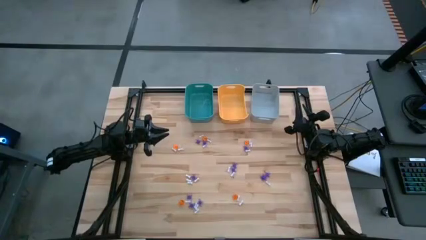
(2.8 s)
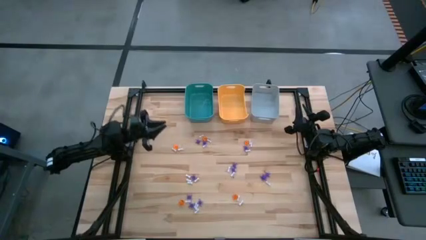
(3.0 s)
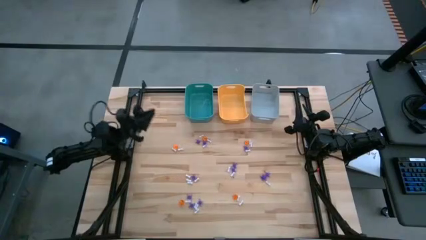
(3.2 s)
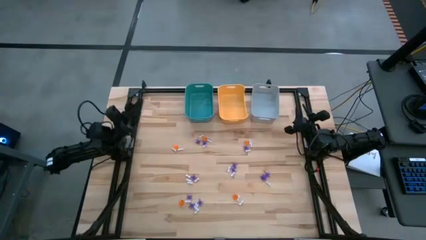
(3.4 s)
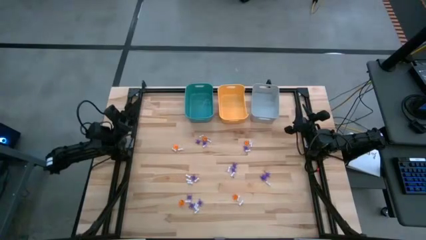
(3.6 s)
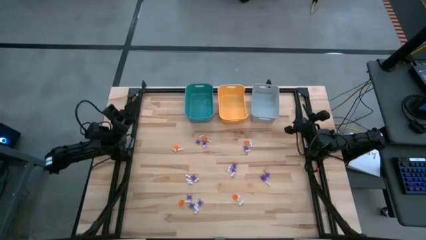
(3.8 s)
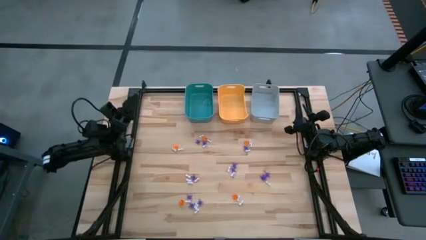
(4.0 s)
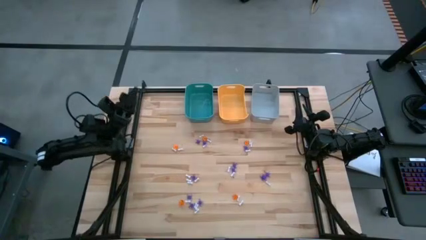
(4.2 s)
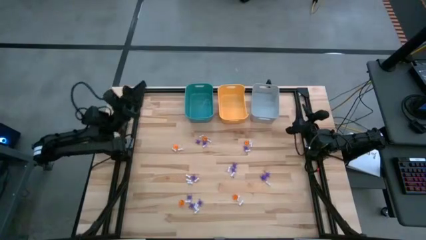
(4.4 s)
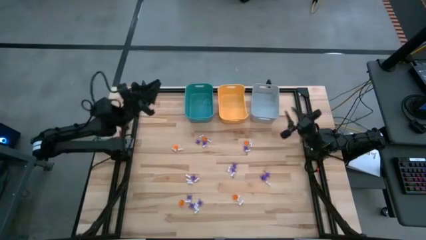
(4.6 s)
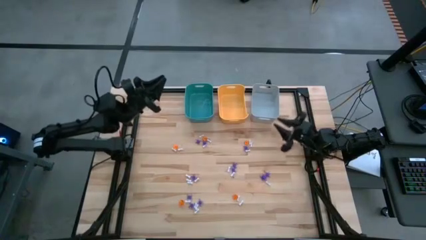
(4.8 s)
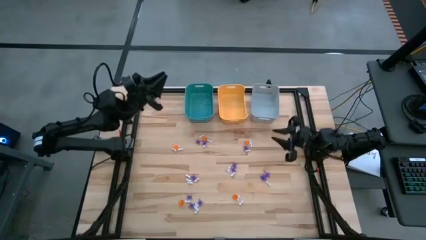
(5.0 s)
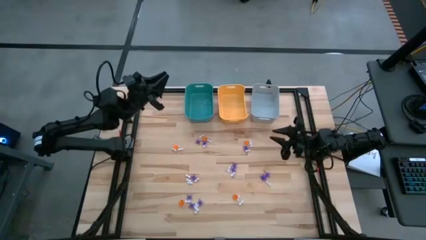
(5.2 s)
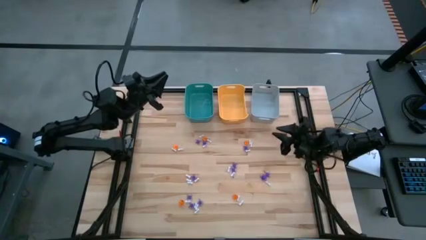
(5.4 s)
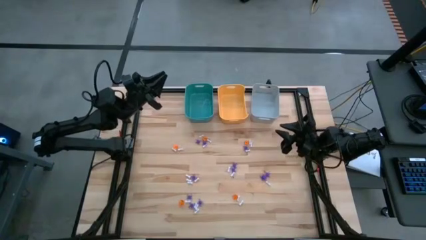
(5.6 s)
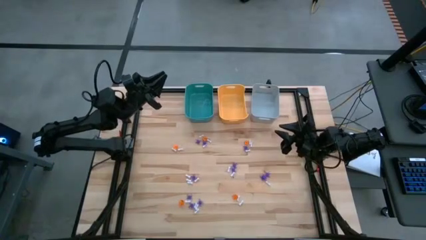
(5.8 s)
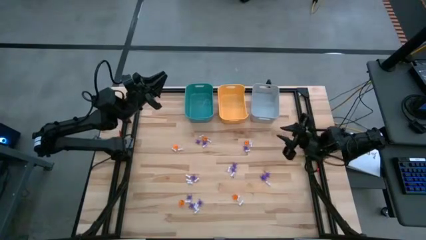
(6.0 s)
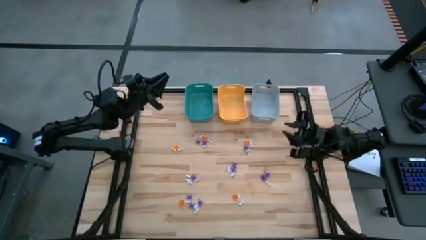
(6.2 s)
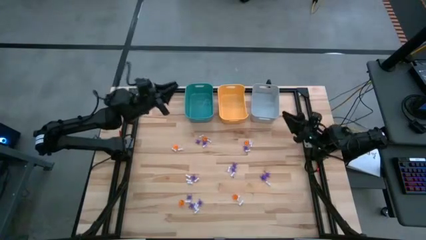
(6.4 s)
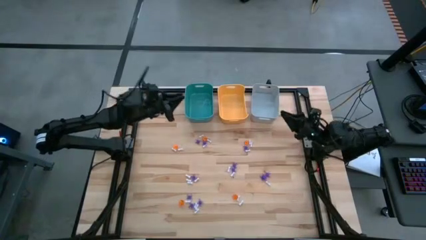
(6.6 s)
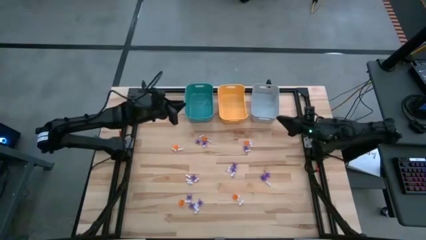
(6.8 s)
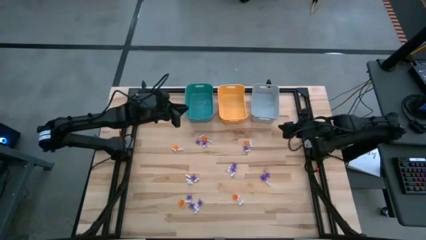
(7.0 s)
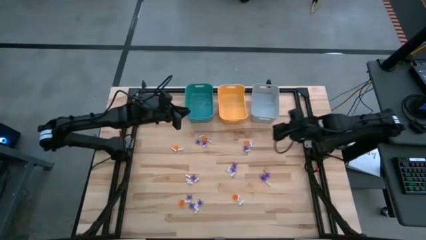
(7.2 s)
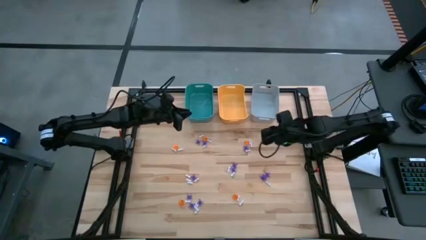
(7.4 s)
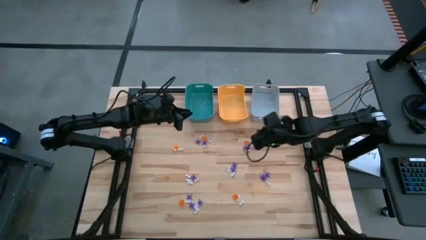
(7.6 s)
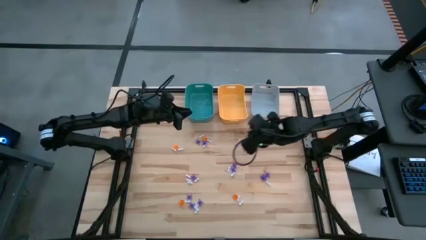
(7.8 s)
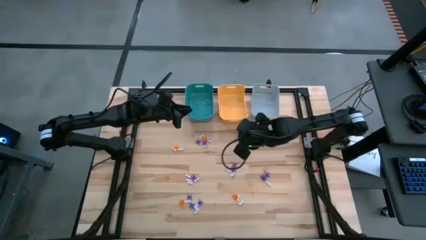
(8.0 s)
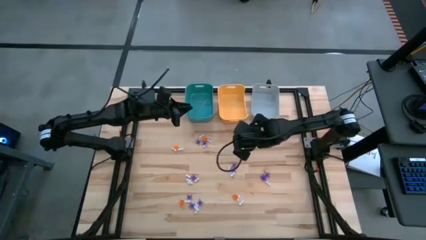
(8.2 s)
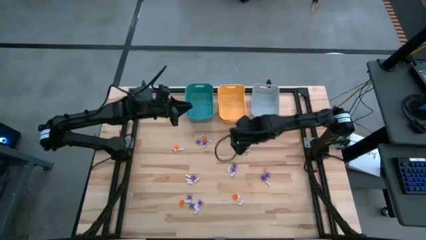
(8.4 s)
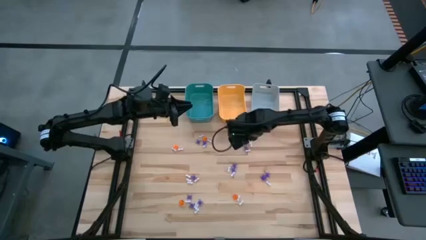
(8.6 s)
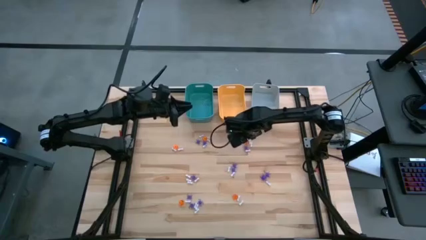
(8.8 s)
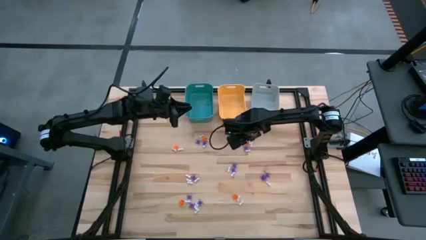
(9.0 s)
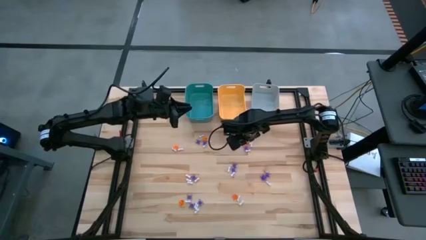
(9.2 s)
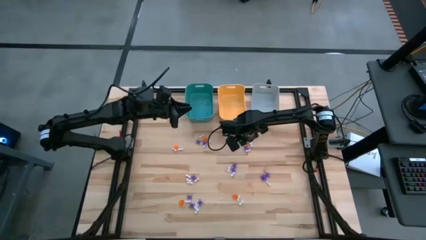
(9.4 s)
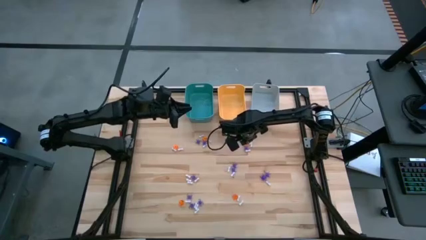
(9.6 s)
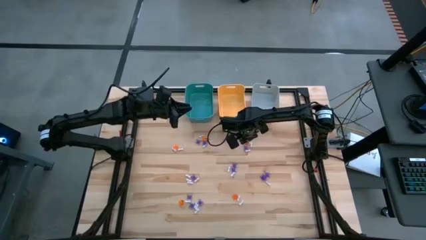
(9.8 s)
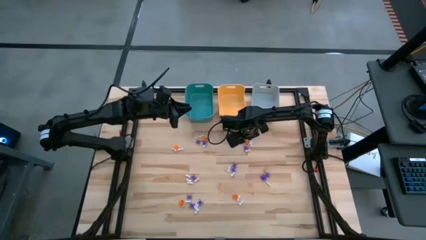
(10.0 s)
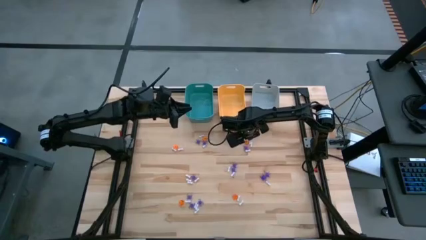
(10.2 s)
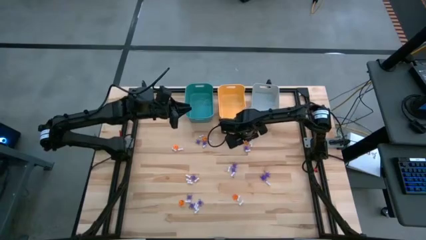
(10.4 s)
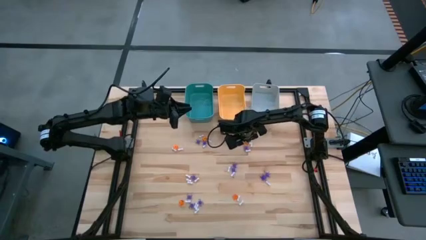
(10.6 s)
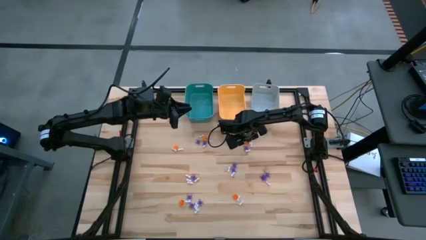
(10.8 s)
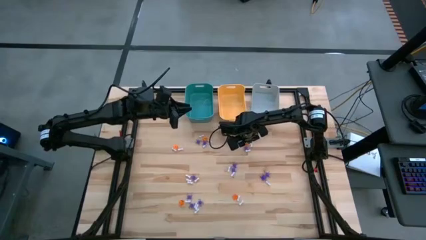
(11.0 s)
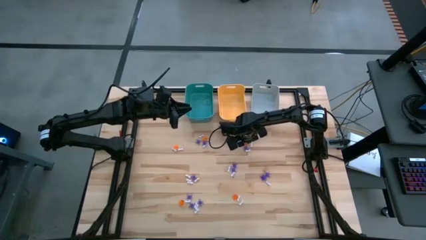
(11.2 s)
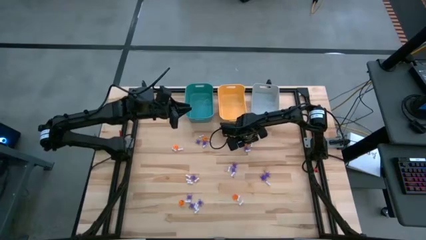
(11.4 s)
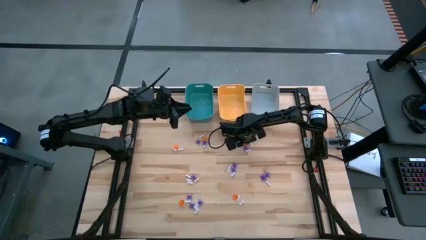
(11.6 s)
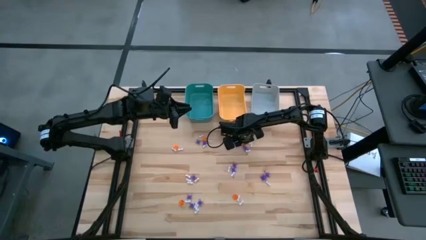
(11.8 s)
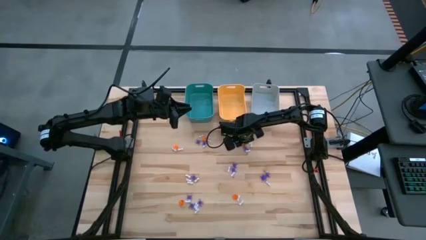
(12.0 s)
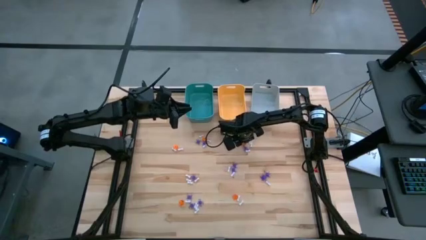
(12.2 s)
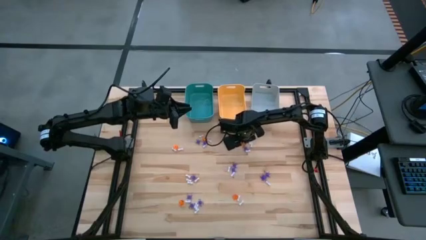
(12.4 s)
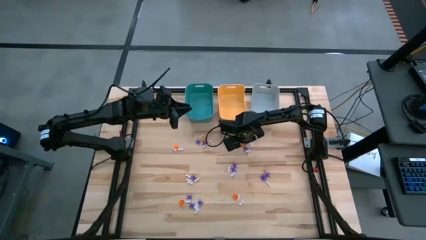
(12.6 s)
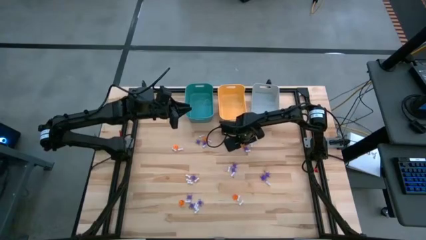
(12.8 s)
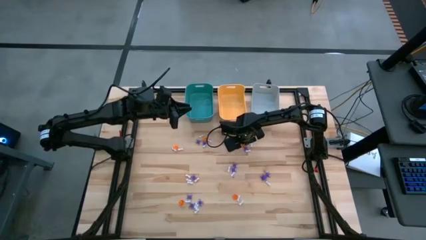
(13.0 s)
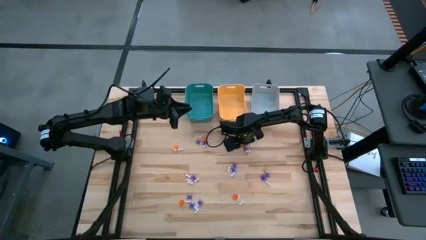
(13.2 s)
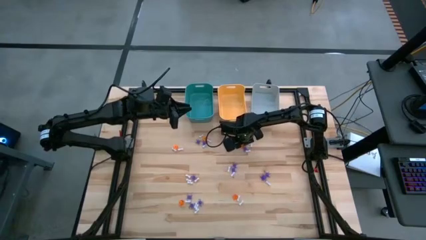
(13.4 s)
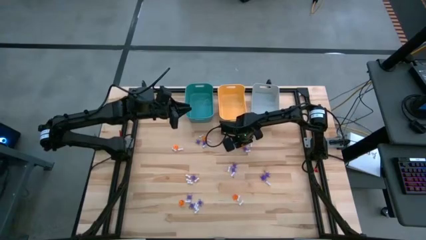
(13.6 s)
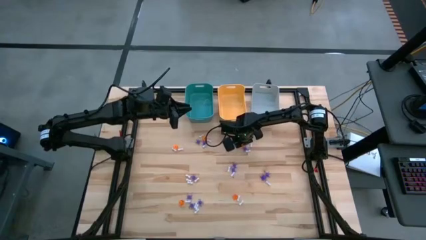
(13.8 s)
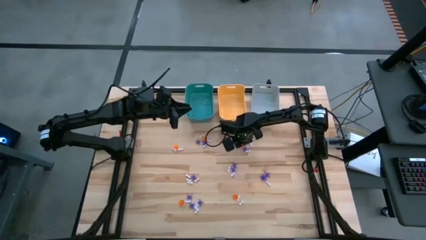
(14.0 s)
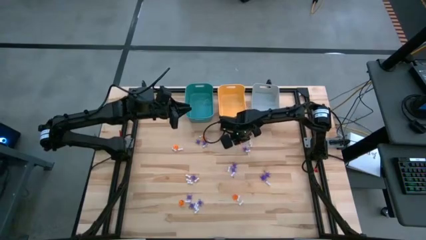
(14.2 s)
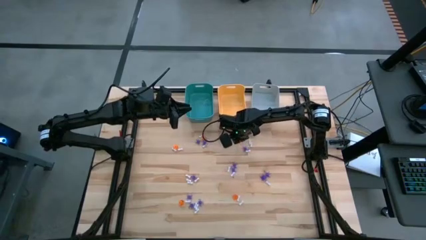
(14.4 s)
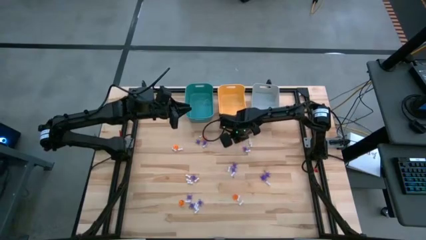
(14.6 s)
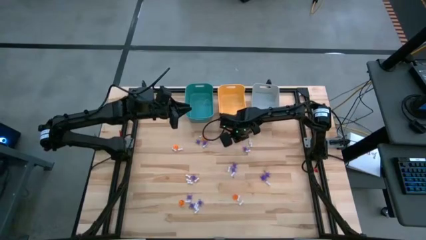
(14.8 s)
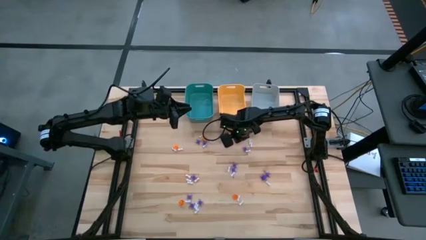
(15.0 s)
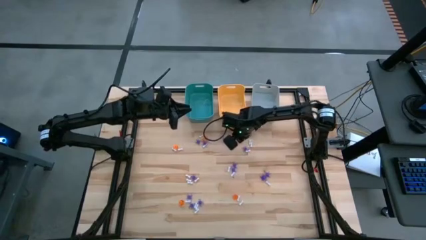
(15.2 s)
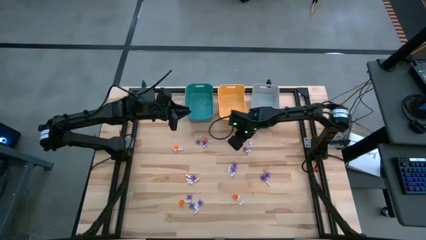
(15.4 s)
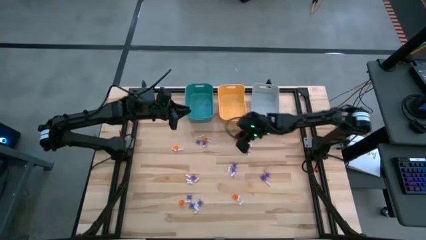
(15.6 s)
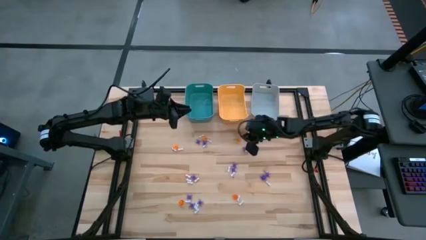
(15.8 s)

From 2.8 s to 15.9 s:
Task: Sort Halloween decoration
Put the orange pumpkin toy into the yellow bin

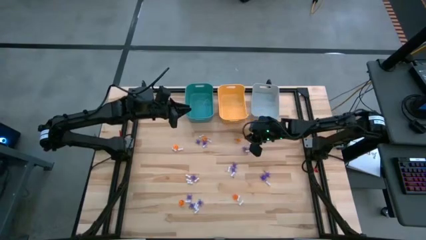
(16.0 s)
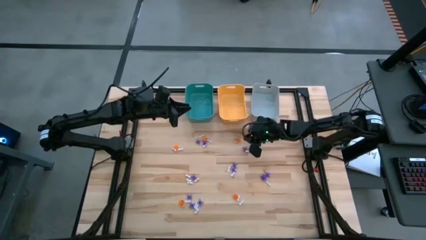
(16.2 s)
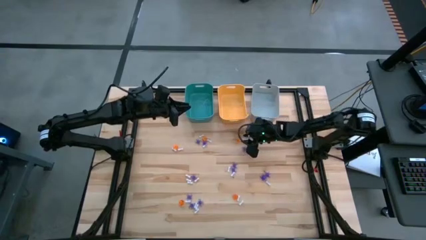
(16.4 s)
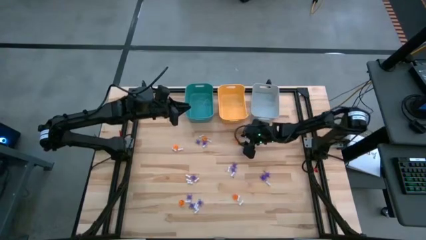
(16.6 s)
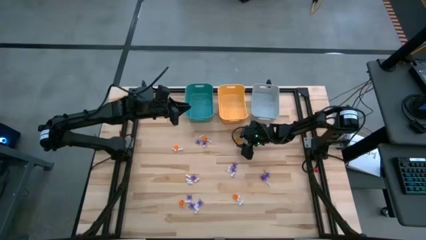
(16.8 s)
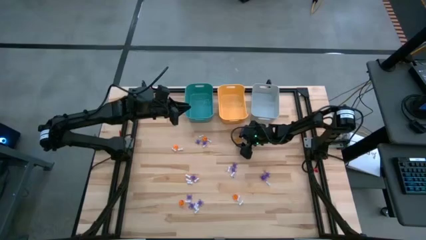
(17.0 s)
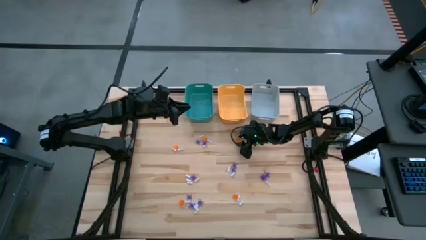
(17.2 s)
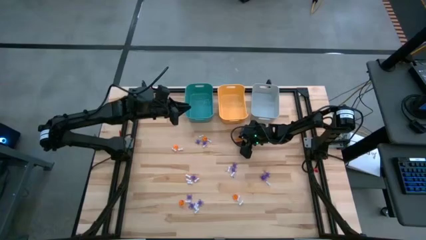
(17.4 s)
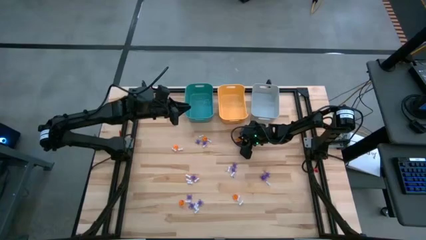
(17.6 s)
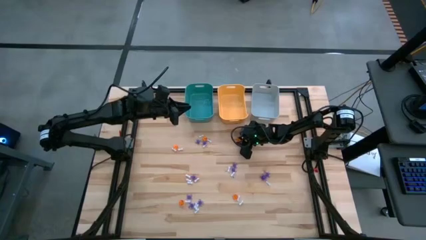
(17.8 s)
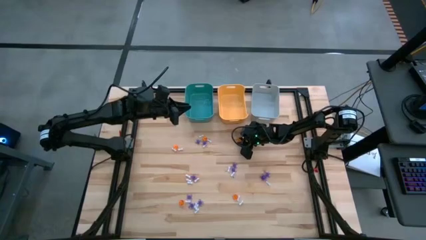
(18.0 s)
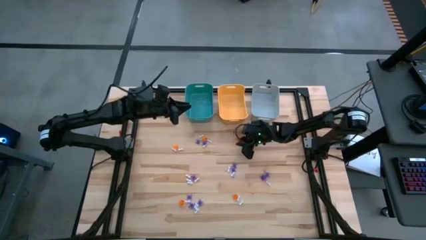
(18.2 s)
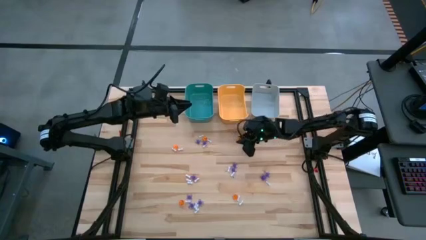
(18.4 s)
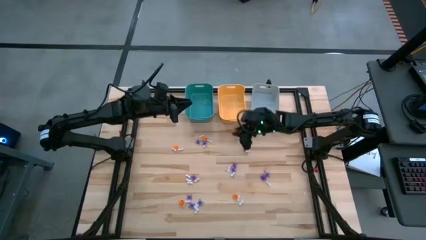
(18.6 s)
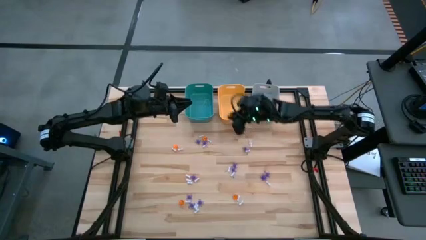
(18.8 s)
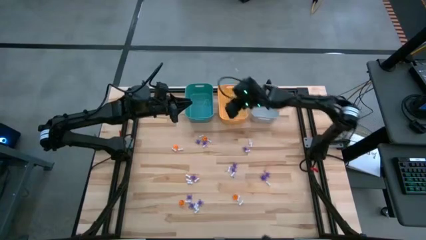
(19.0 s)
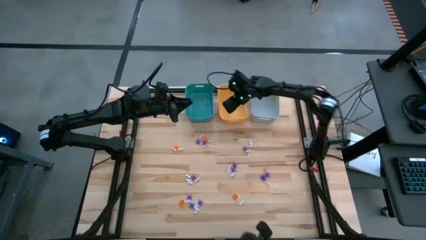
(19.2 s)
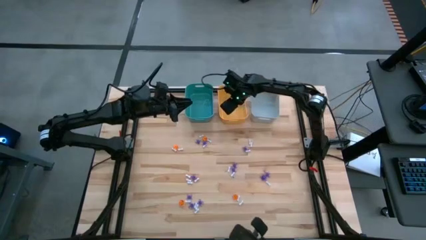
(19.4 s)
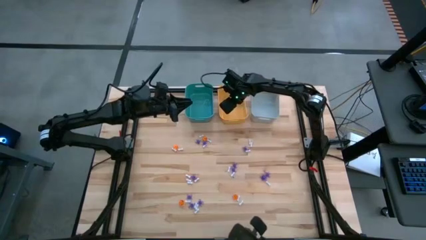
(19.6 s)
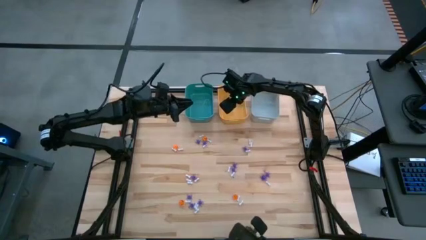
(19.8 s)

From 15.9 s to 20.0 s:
Put the orange pumpkin toy into the yellow bin
